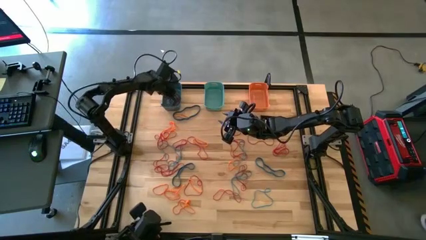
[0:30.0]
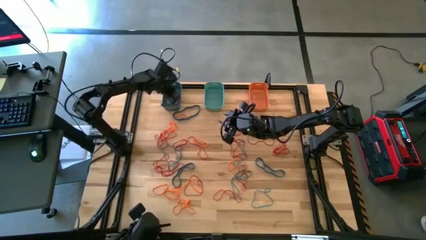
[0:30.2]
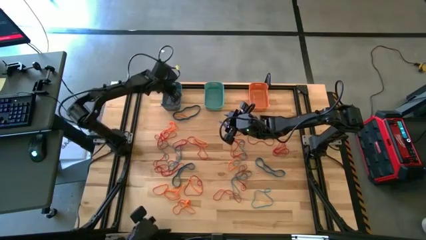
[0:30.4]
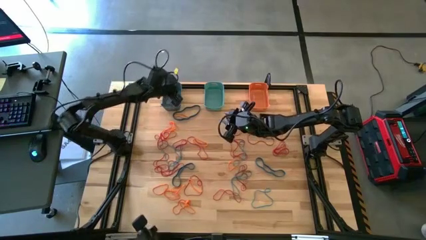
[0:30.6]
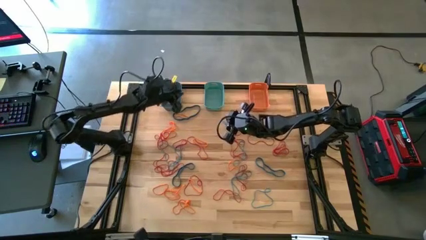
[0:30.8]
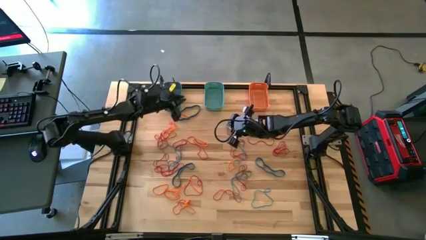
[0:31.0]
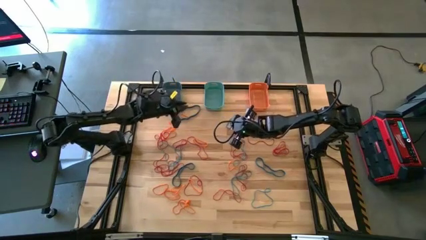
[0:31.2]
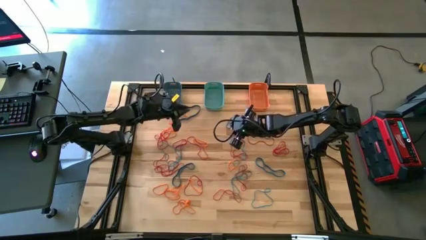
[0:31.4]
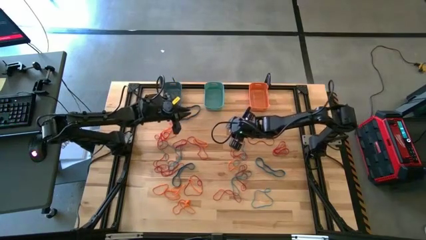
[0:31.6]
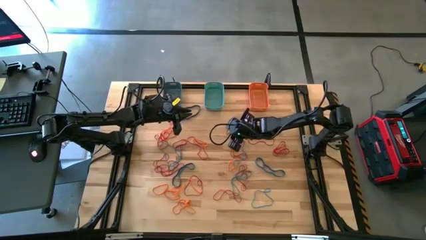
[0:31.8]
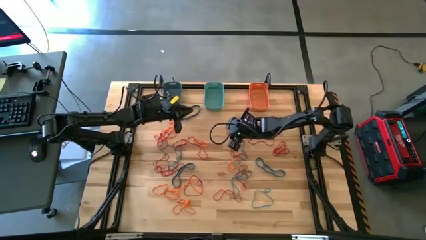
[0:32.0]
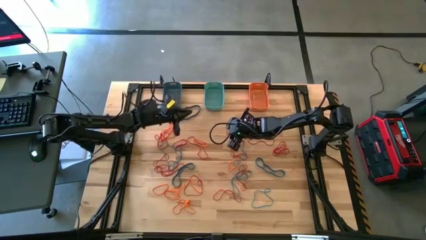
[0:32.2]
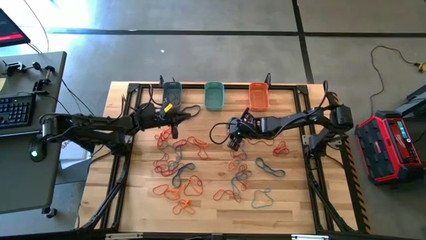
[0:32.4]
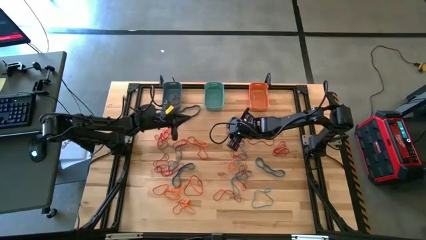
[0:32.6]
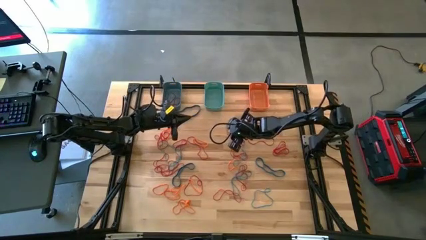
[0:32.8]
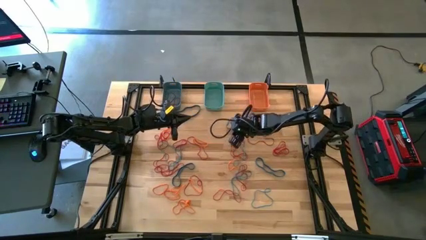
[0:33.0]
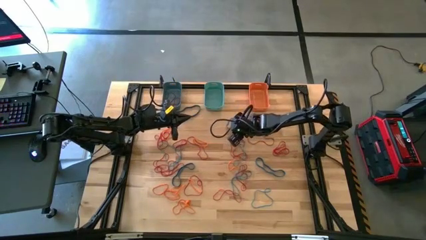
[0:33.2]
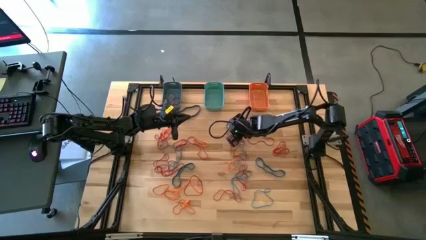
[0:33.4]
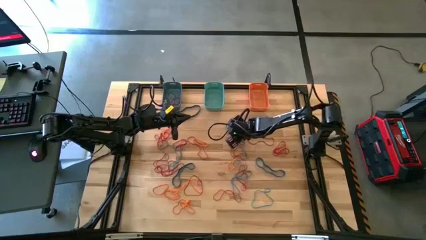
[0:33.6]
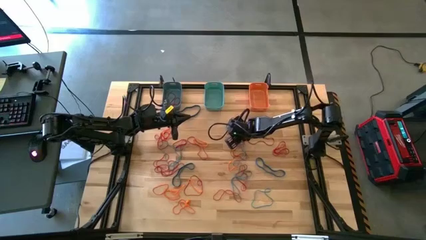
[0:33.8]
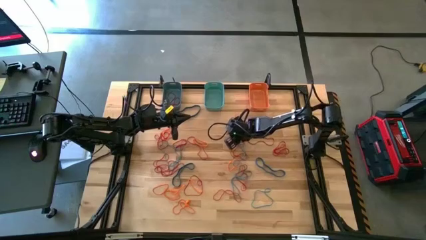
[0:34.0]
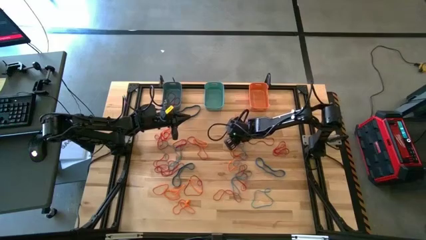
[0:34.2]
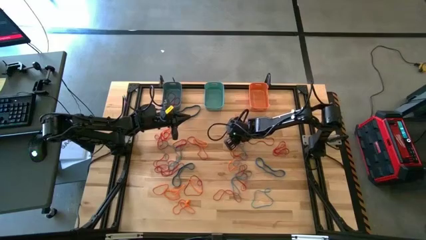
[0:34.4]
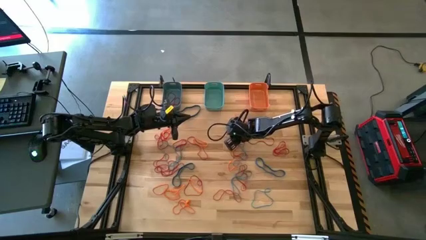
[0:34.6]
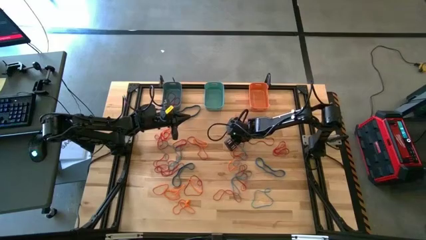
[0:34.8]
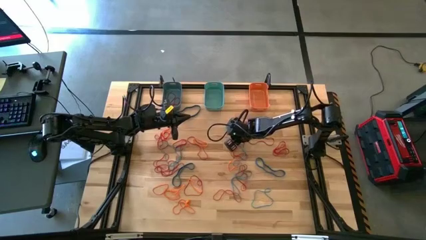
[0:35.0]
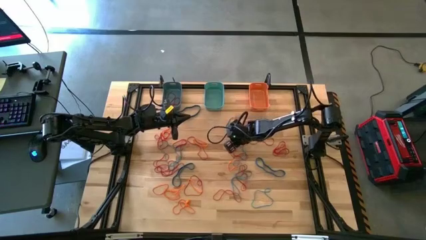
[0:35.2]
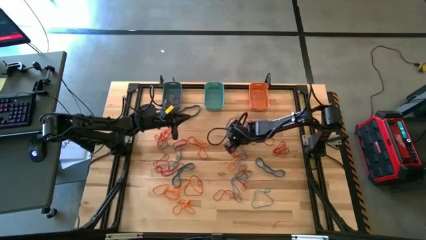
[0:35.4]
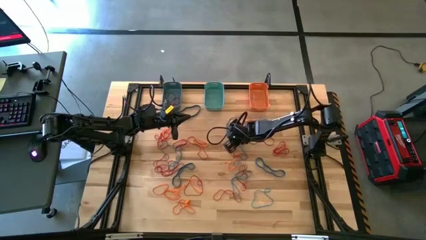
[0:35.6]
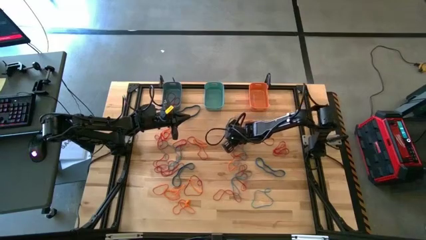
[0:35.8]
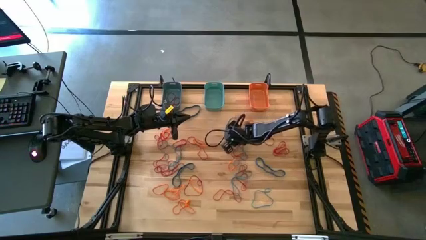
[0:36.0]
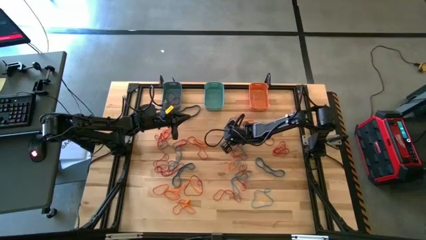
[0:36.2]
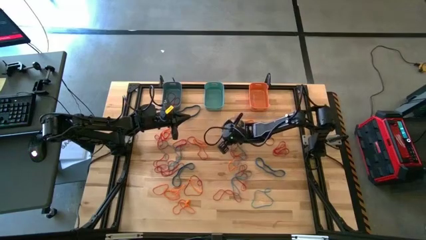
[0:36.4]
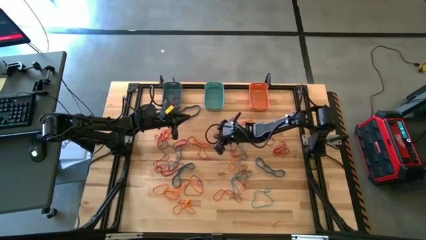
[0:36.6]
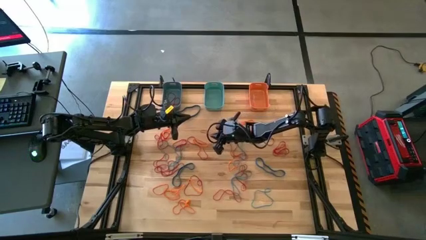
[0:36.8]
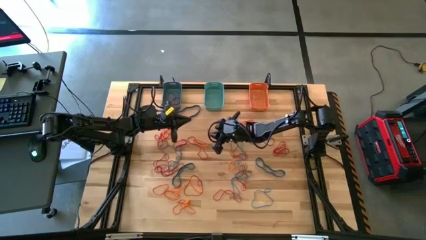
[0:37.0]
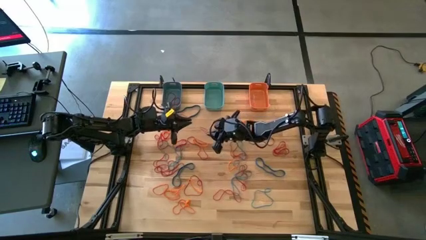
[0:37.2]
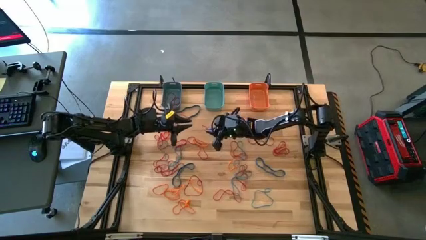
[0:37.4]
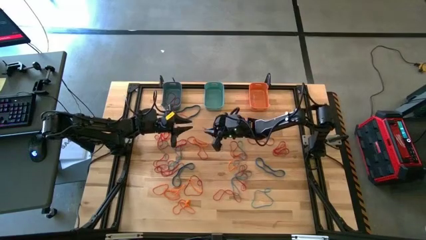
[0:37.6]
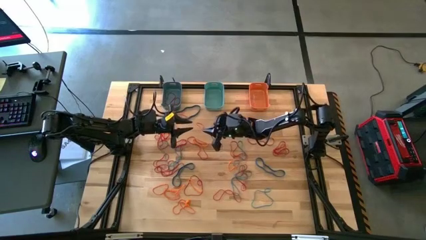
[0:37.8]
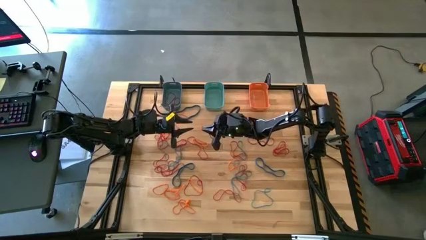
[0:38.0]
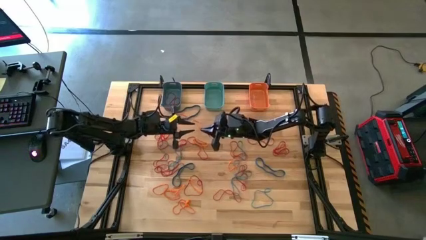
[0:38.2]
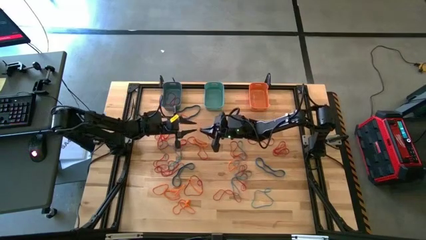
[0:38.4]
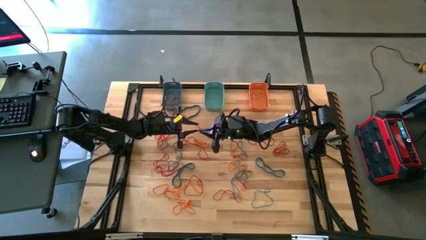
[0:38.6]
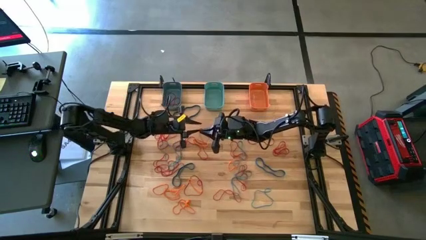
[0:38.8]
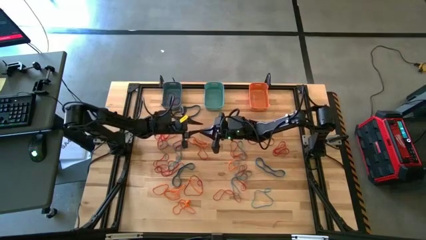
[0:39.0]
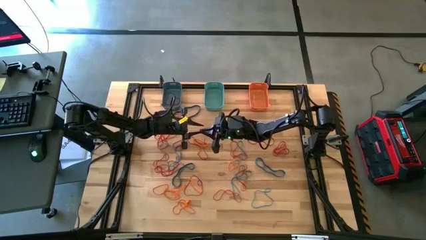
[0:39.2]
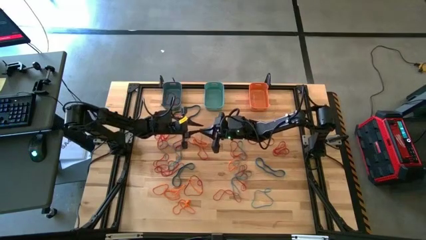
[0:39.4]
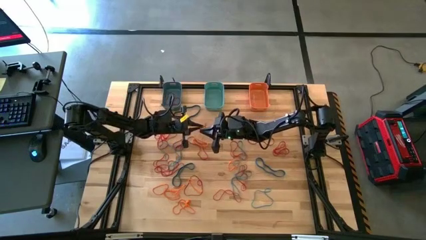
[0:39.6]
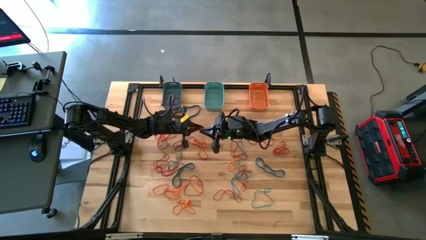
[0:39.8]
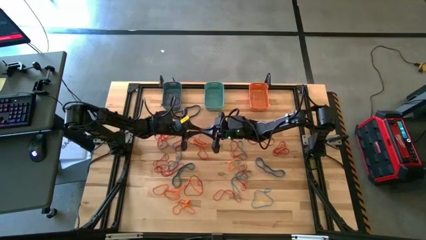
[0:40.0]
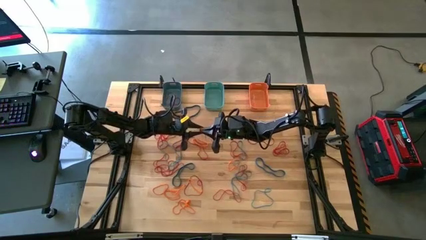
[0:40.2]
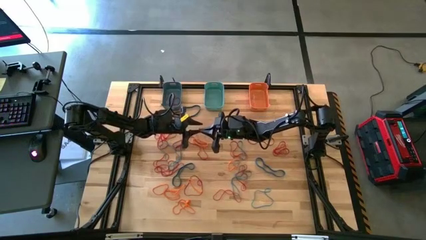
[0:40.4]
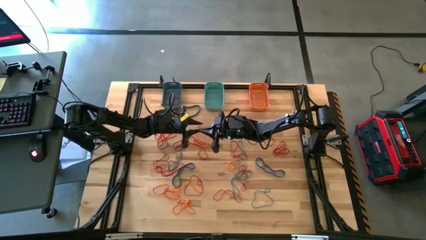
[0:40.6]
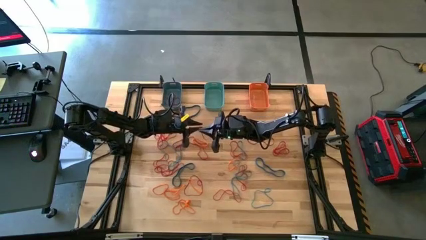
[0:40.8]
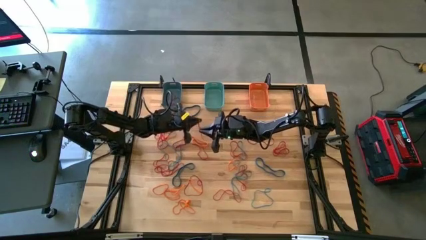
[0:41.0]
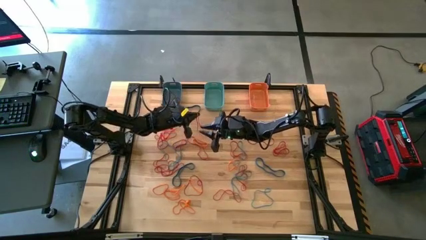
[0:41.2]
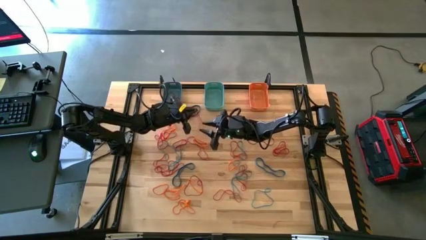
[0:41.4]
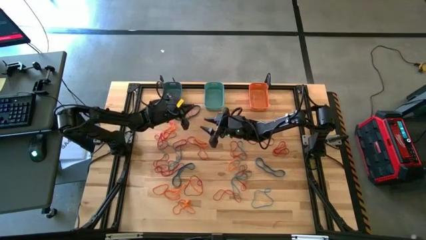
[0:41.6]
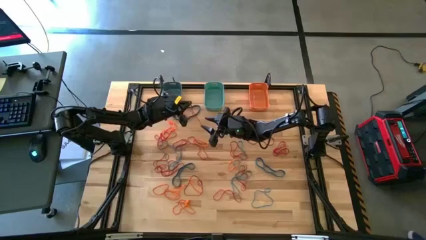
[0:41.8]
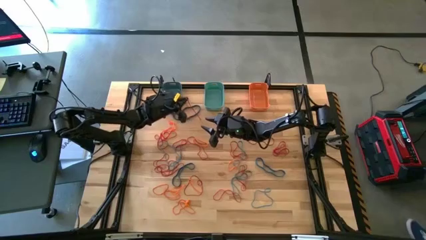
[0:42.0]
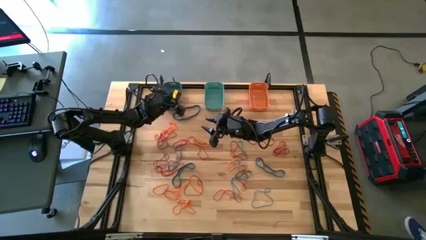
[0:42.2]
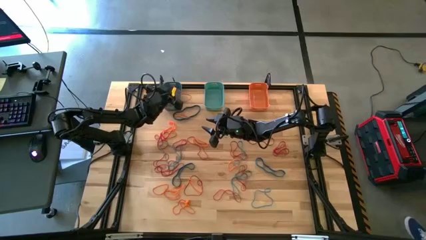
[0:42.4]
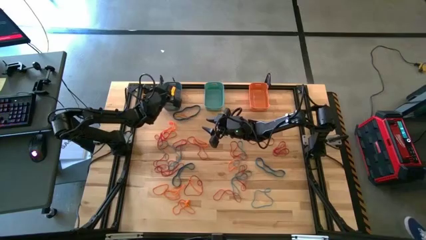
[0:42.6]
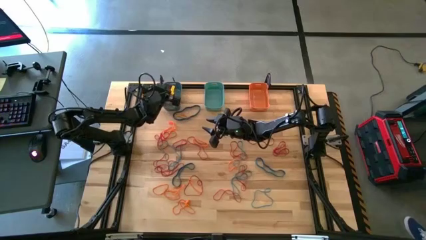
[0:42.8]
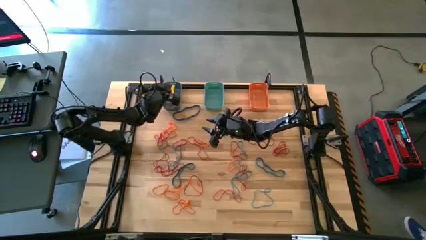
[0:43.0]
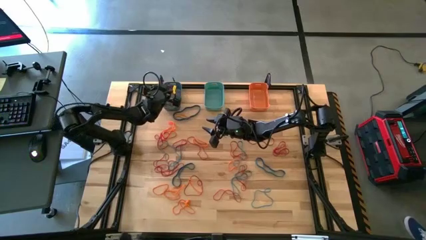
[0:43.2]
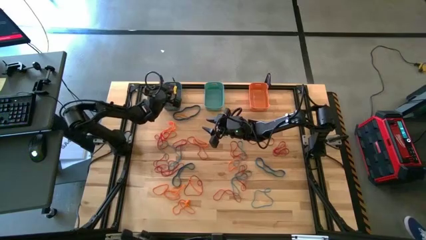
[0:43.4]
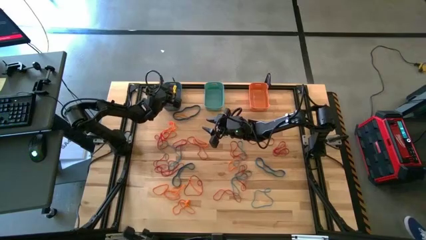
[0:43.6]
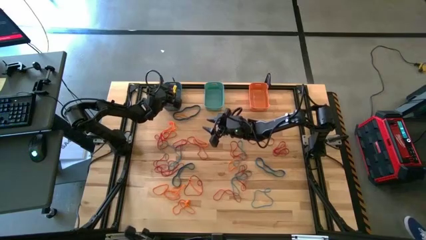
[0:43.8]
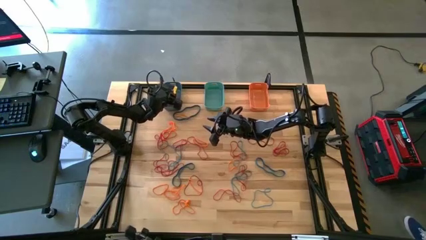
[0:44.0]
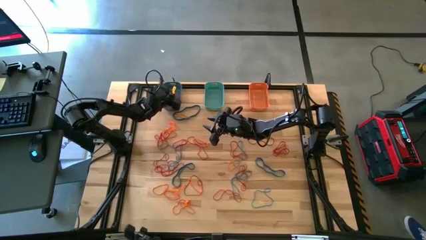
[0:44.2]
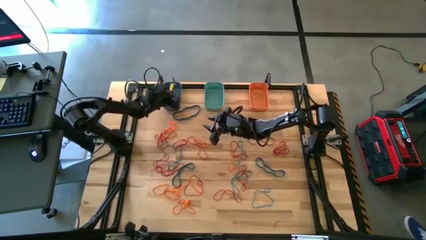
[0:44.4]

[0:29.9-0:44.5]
Task: Sort rubber bands into baskets
Put the red rubber band into the blue bin
